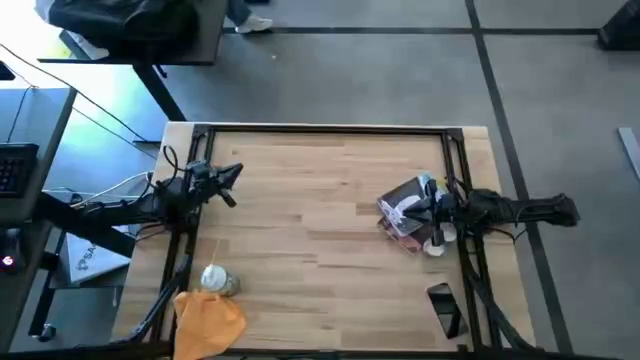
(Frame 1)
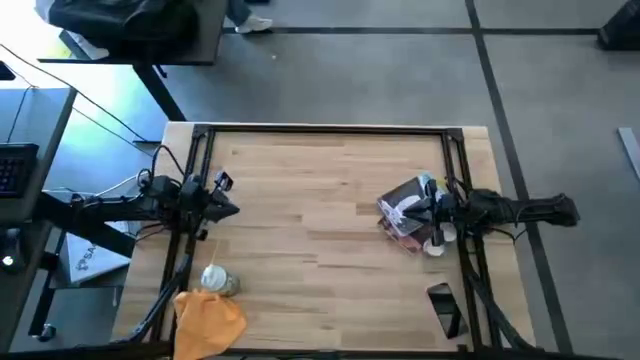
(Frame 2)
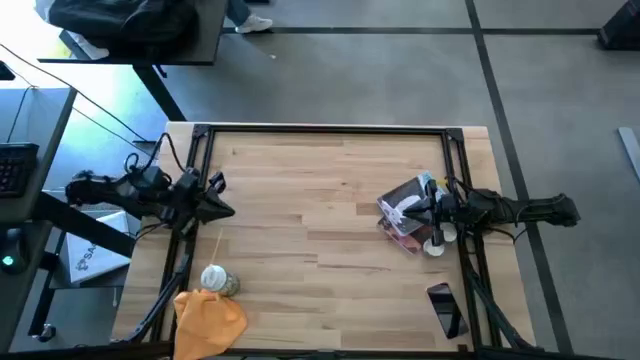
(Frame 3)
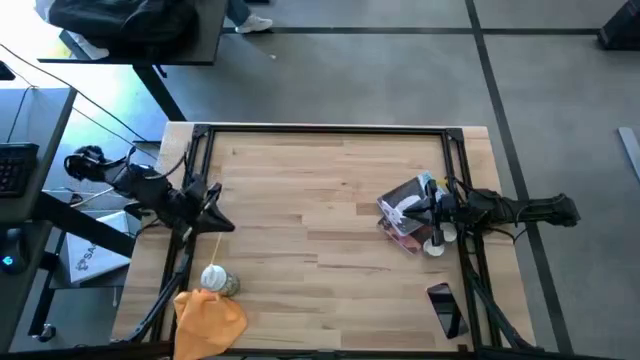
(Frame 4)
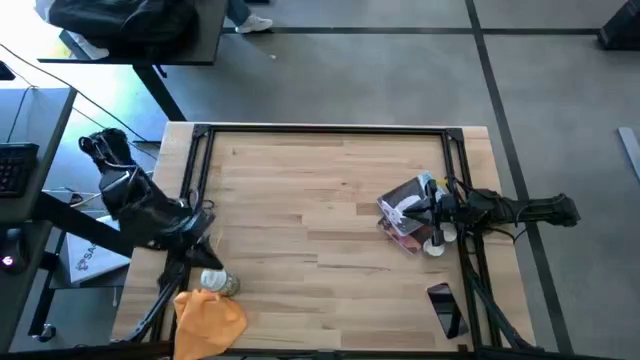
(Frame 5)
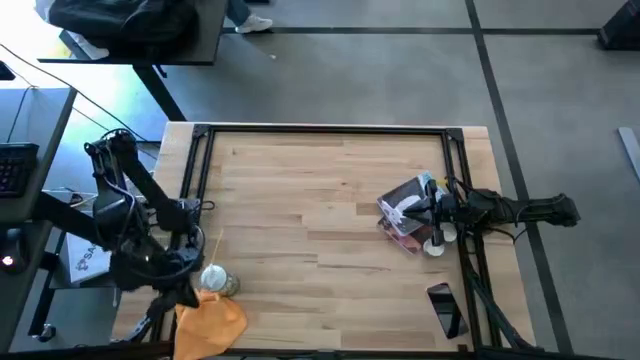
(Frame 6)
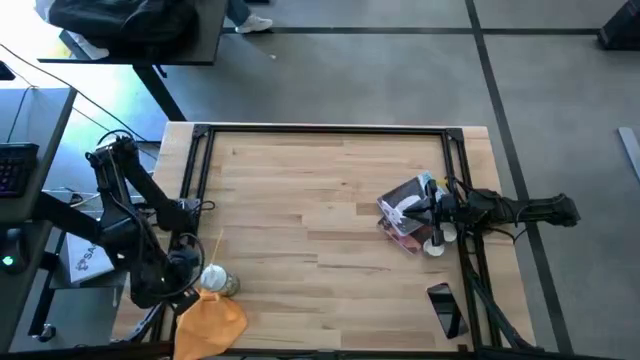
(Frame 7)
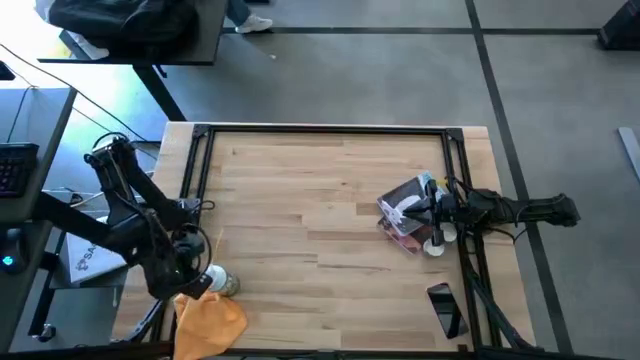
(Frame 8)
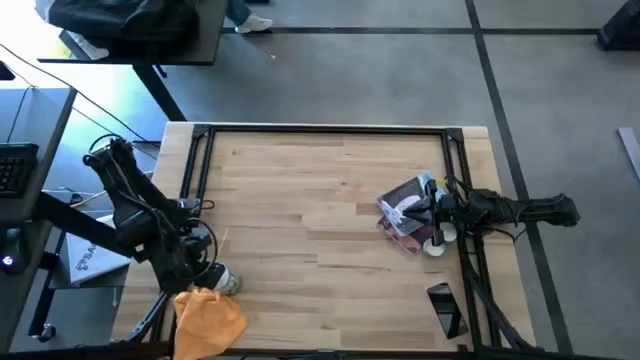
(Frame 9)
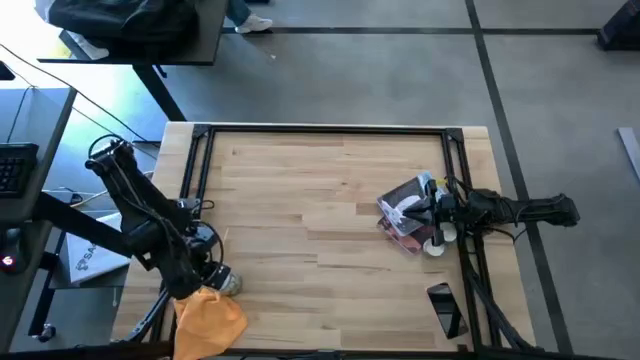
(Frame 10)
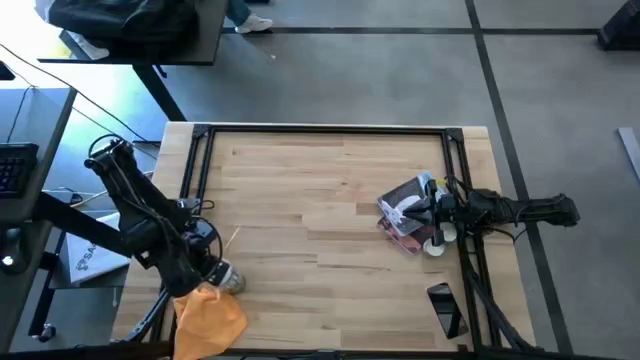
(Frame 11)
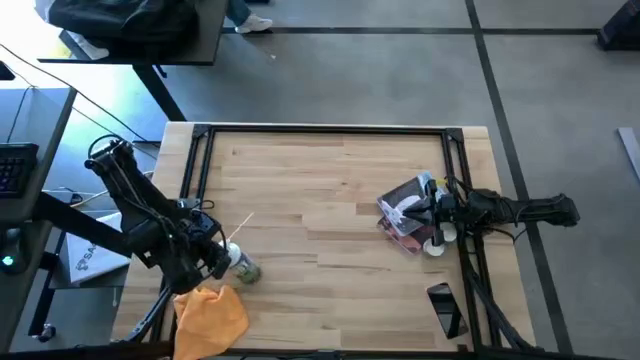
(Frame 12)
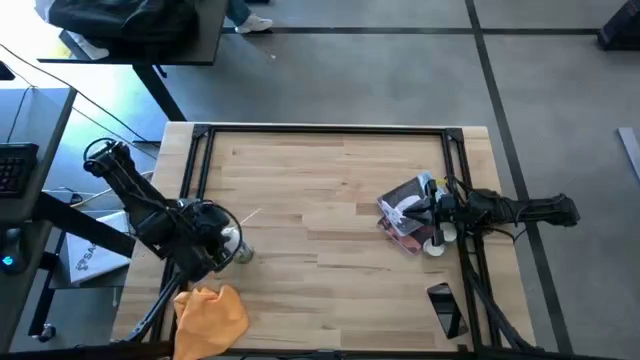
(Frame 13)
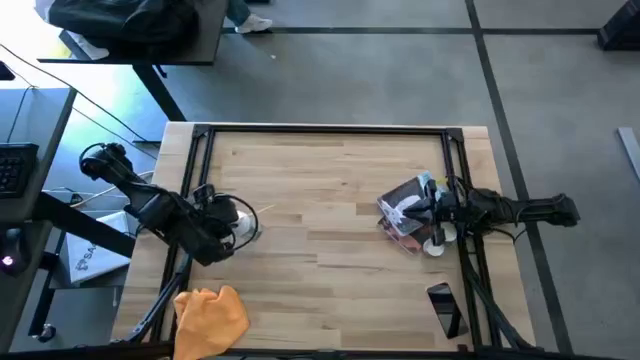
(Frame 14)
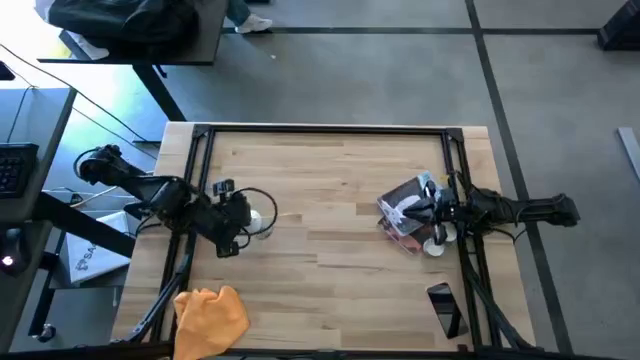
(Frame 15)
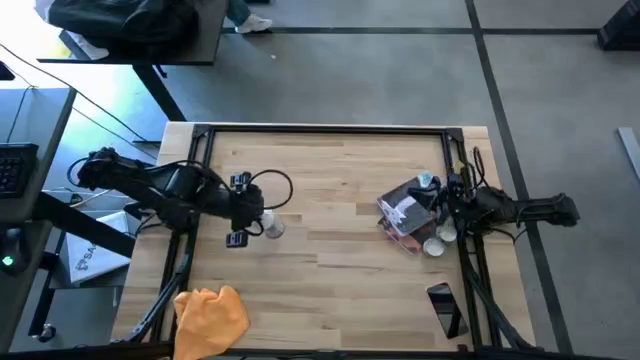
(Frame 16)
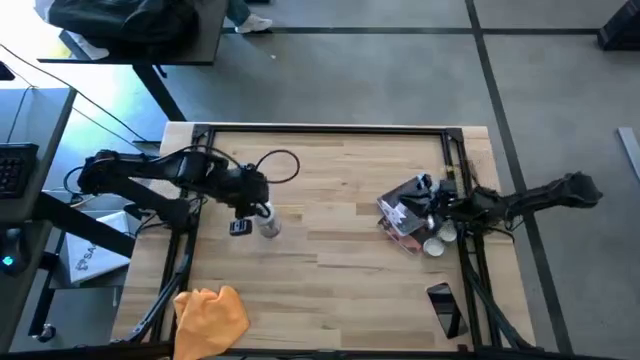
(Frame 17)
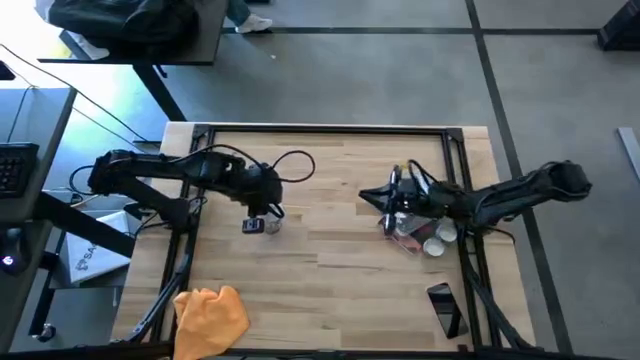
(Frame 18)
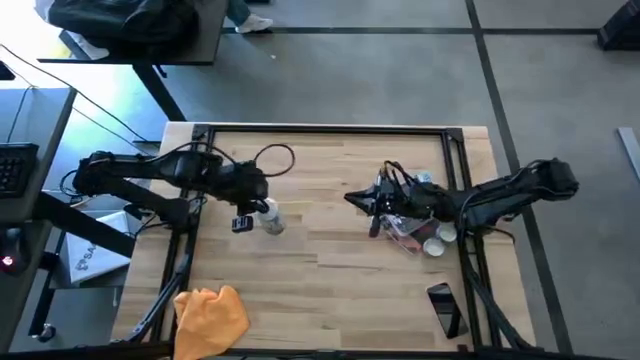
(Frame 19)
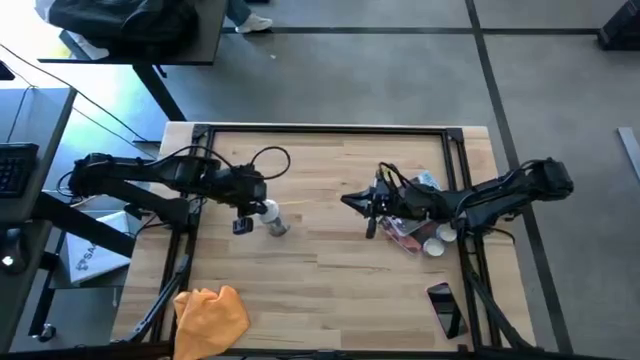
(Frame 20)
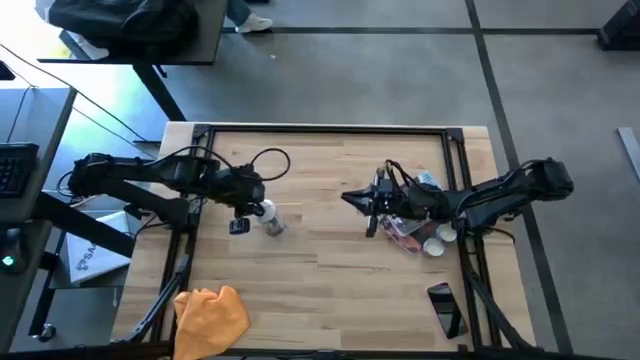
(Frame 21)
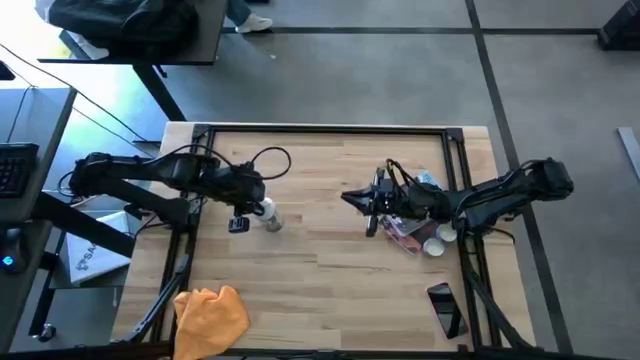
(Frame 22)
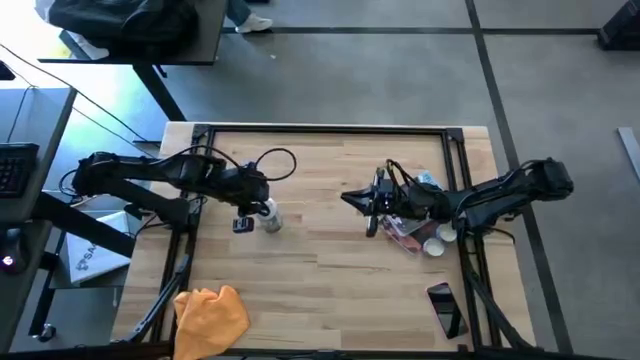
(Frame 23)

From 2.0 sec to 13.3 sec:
Task: Apply microfiber cloth
Move the spray bottle to the middle left of the table

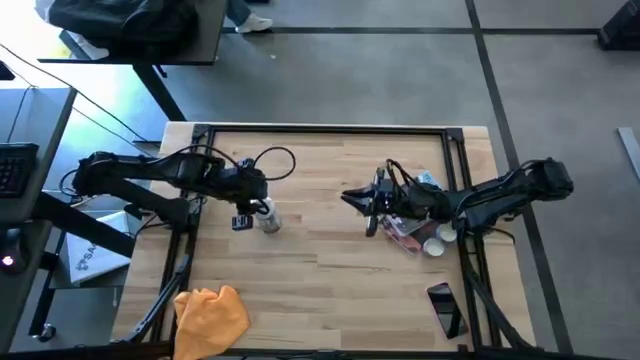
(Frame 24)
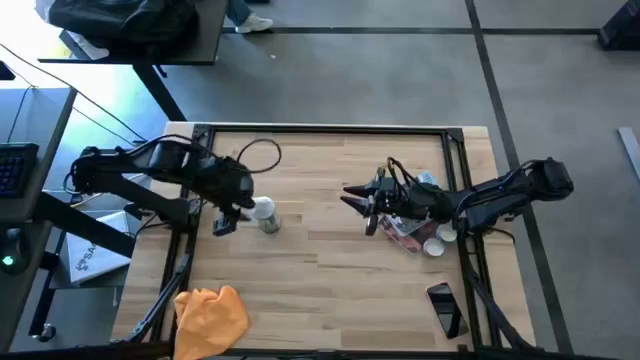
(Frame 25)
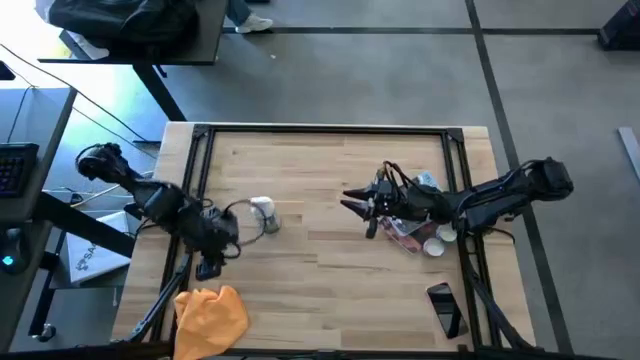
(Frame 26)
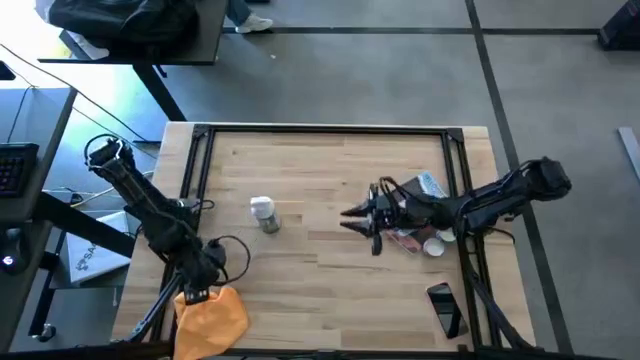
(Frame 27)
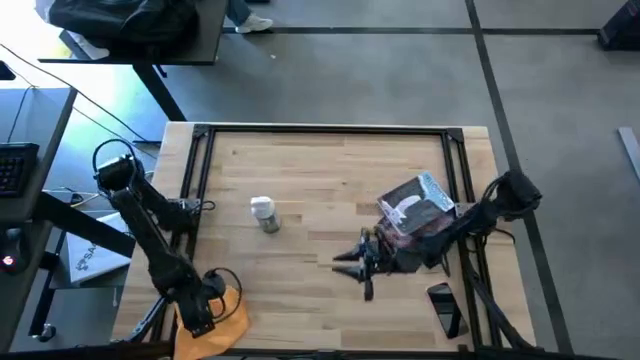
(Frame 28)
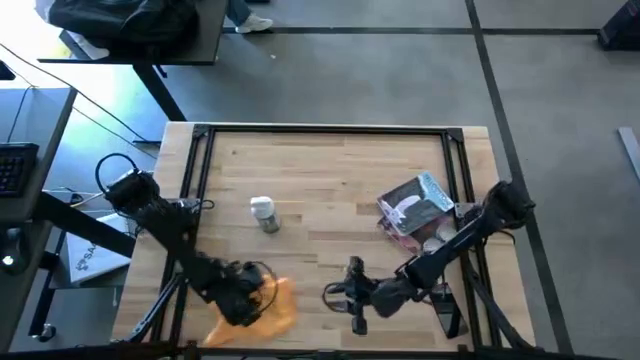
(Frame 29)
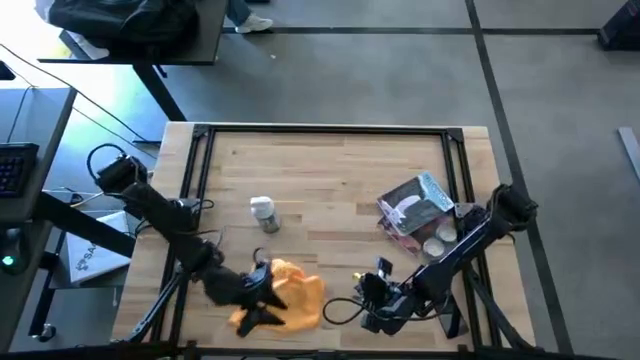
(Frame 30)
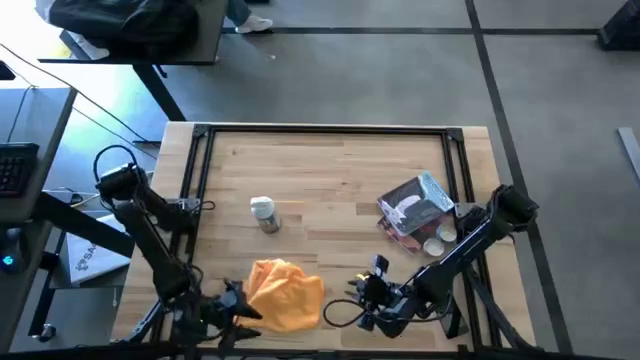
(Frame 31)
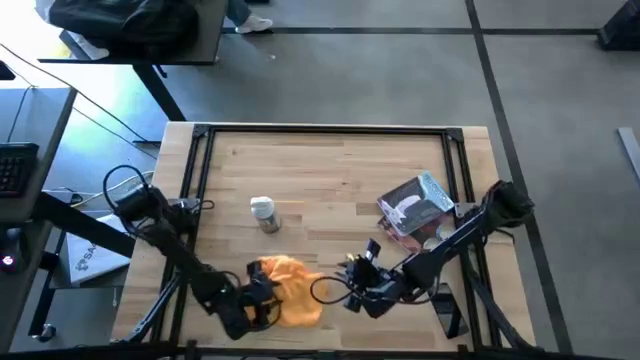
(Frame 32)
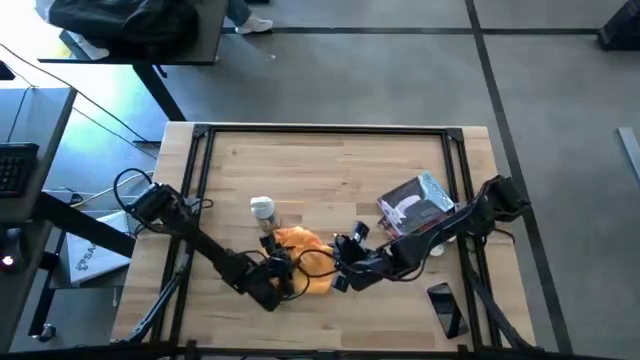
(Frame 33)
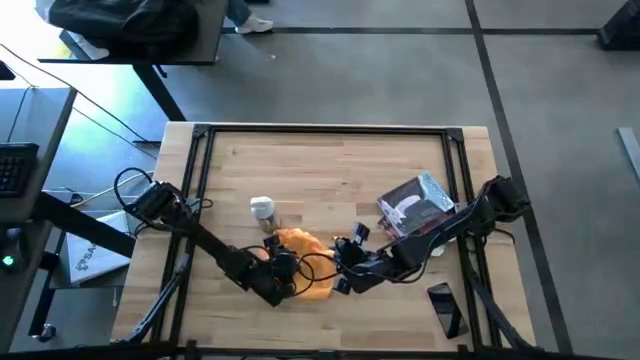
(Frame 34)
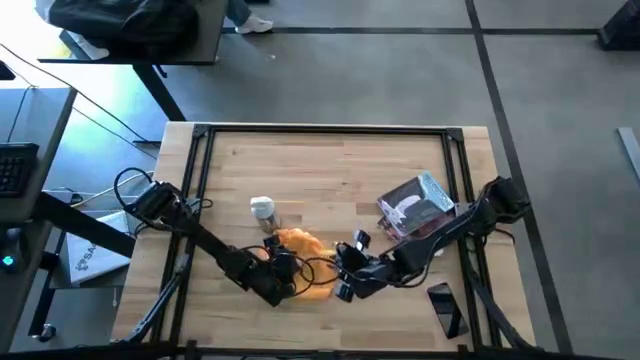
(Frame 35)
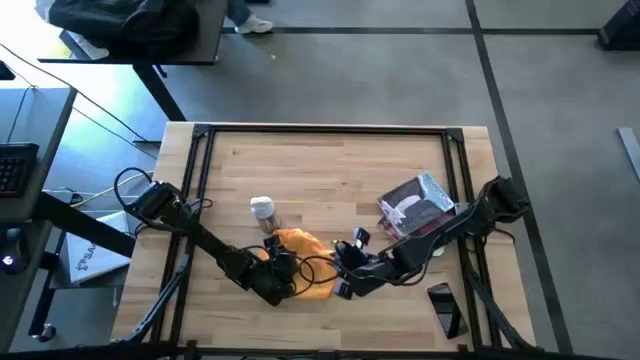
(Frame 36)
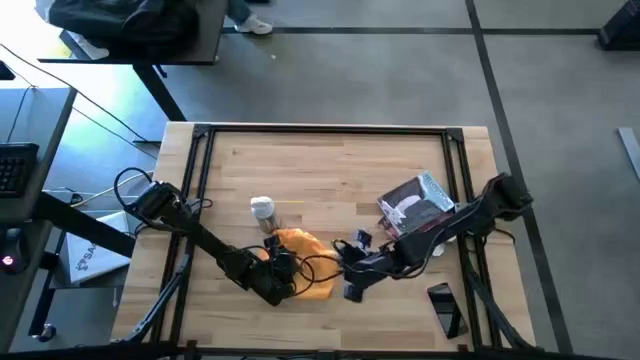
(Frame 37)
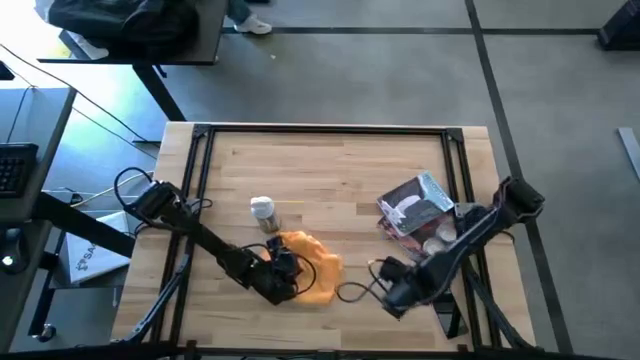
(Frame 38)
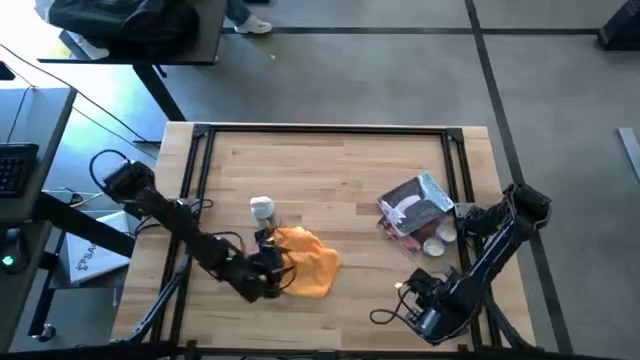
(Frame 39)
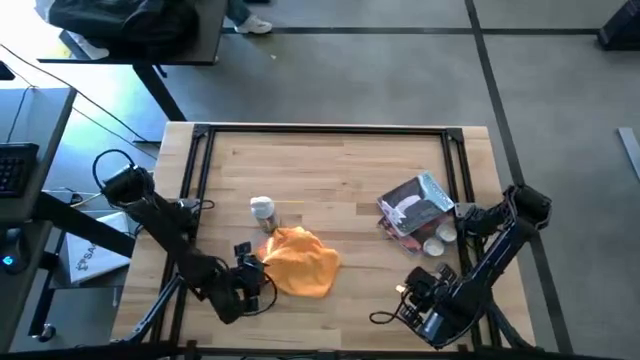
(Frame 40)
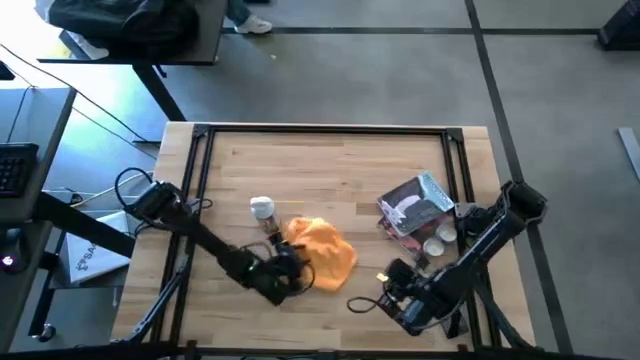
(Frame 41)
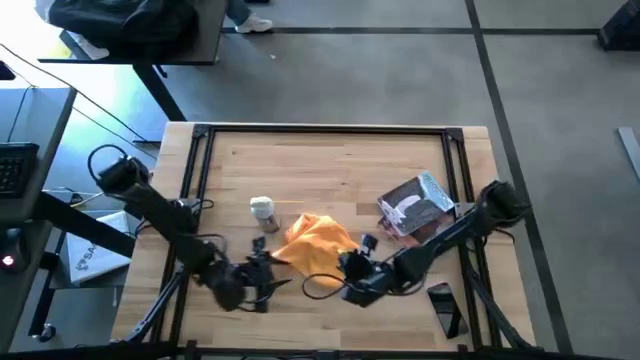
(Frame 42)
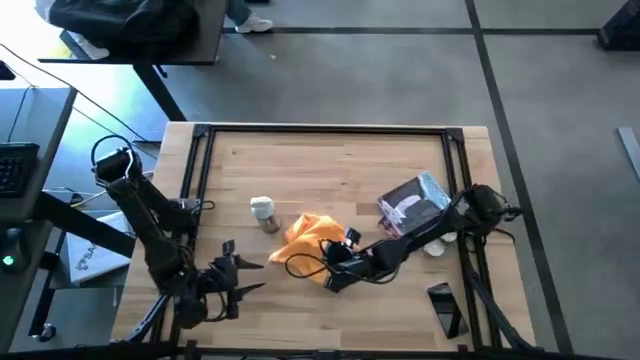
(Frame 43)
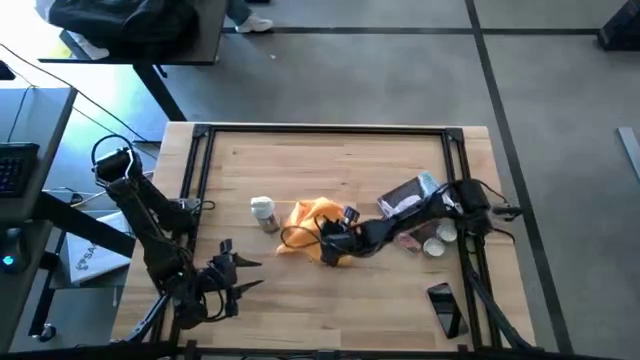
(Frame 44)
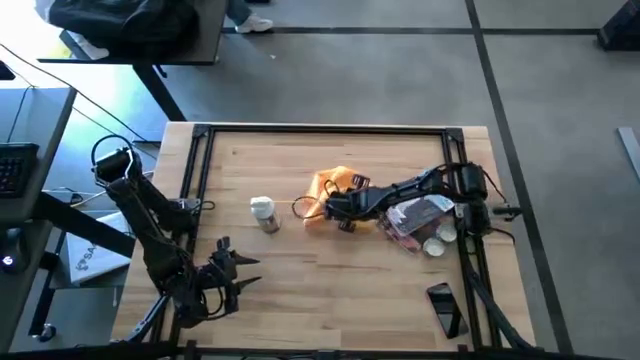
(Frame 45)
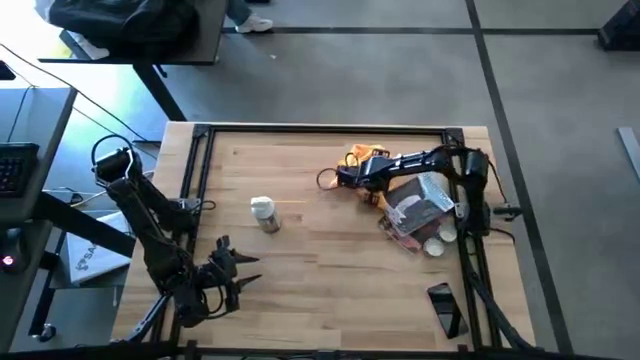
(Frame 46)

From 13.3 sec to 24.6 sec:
Move the orange microfiber cloth to the top right of the table
